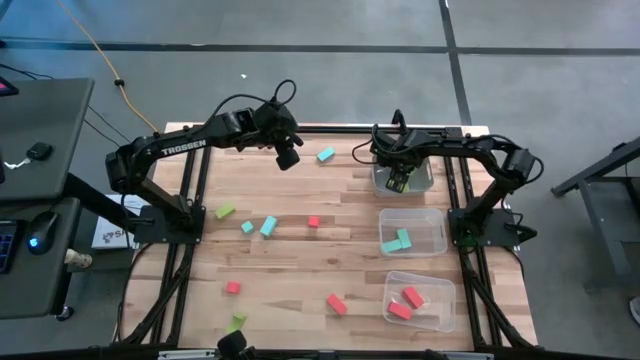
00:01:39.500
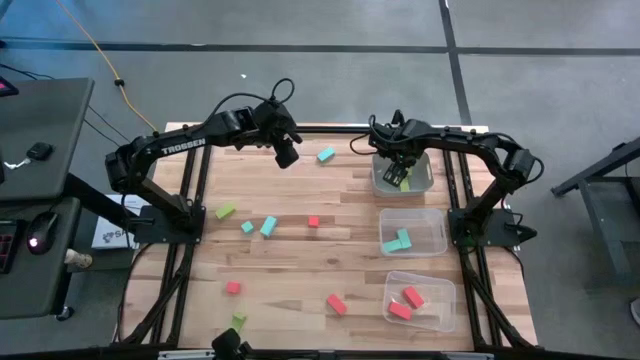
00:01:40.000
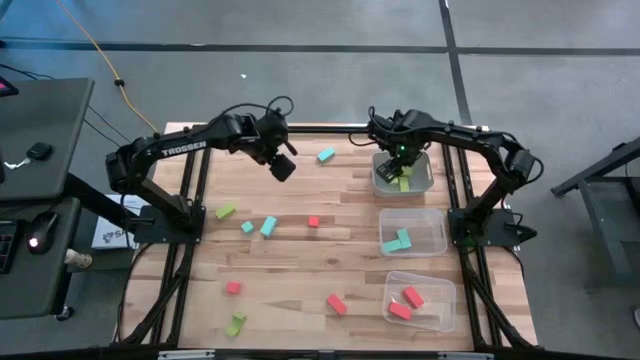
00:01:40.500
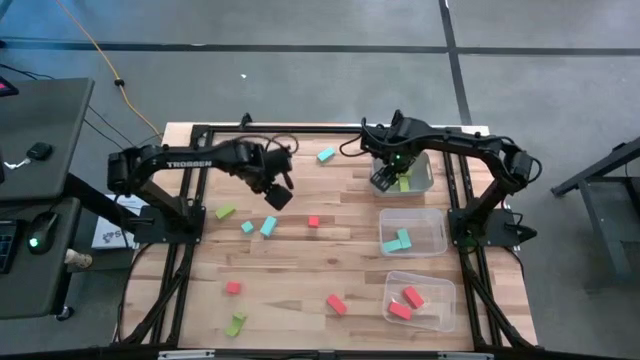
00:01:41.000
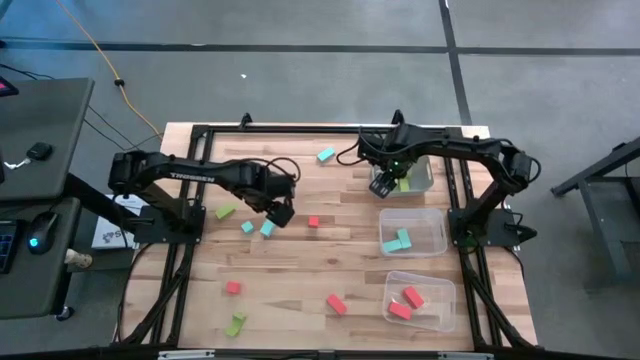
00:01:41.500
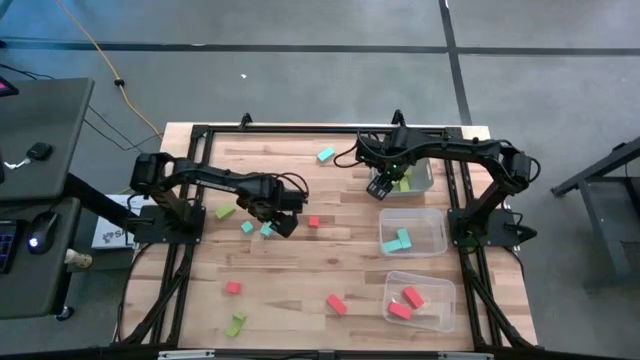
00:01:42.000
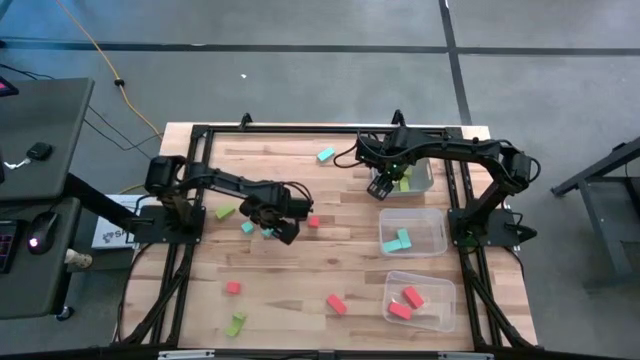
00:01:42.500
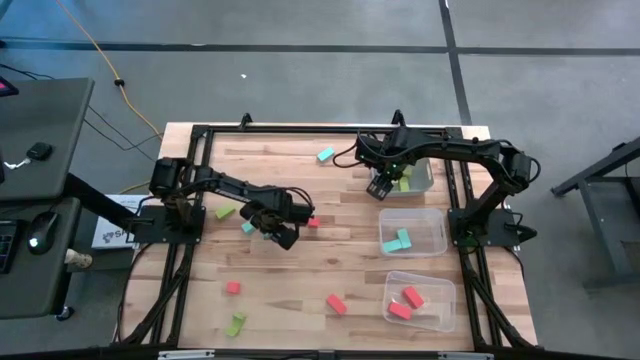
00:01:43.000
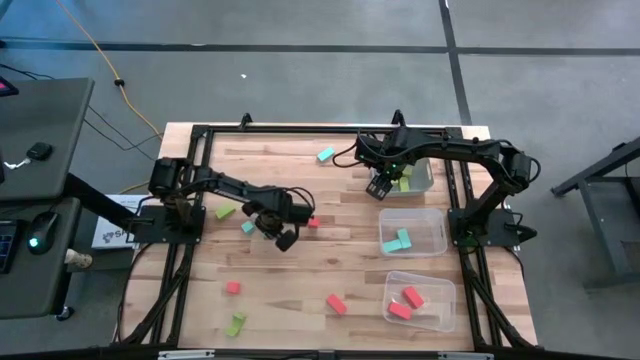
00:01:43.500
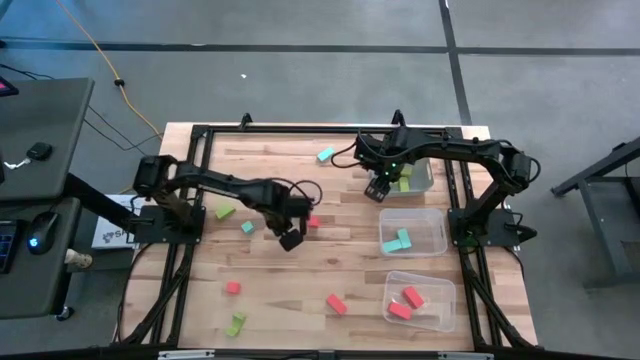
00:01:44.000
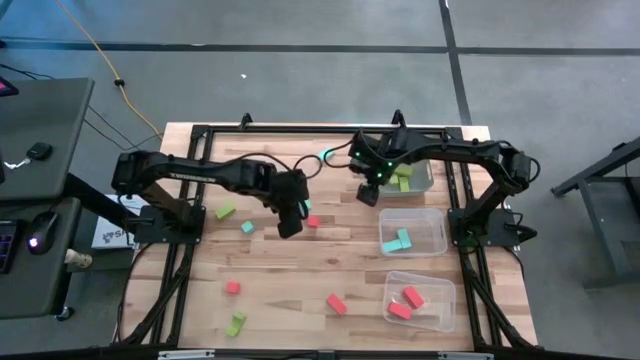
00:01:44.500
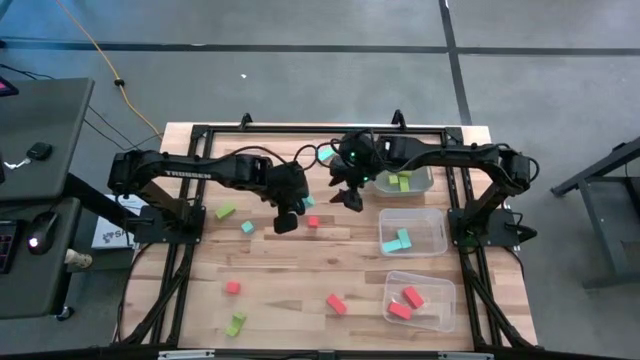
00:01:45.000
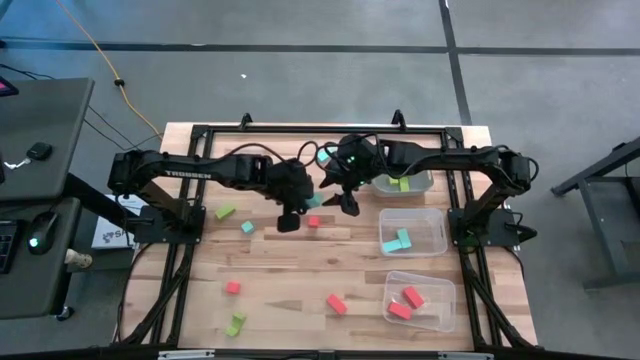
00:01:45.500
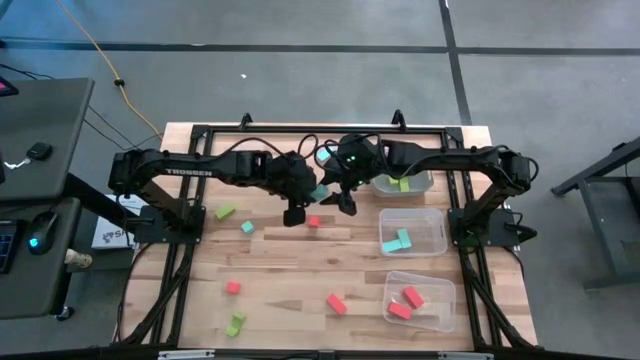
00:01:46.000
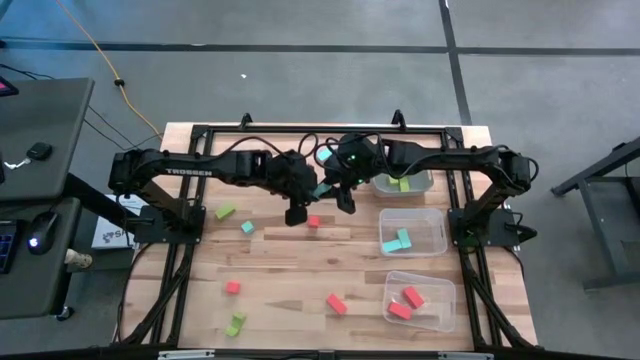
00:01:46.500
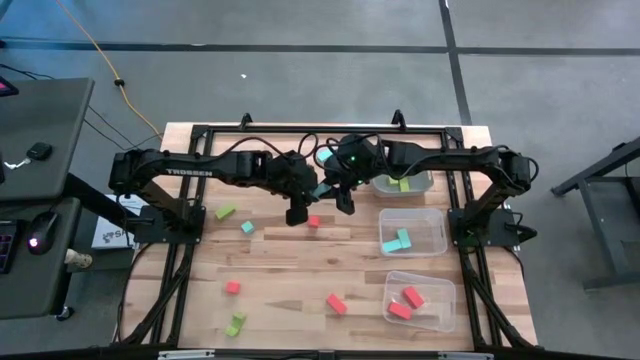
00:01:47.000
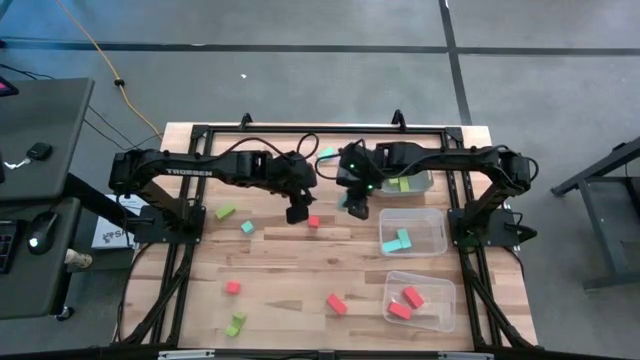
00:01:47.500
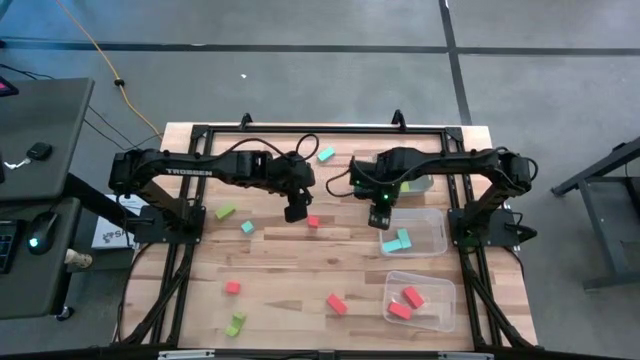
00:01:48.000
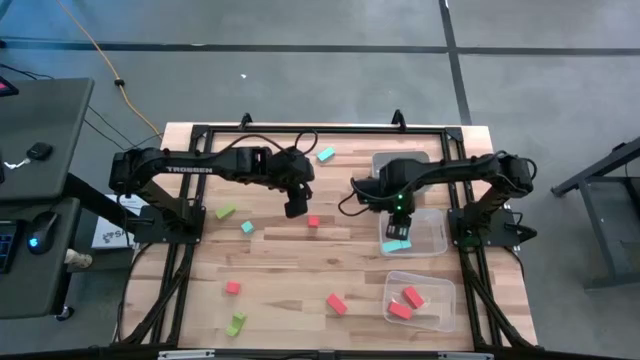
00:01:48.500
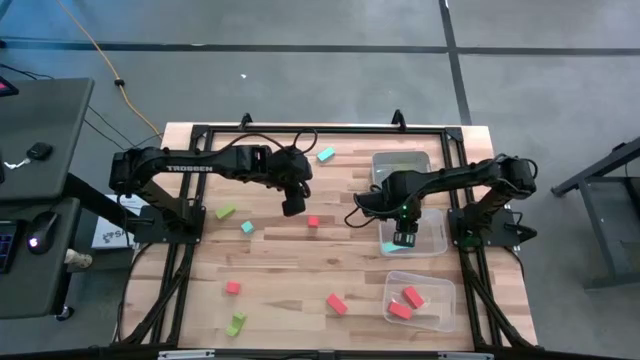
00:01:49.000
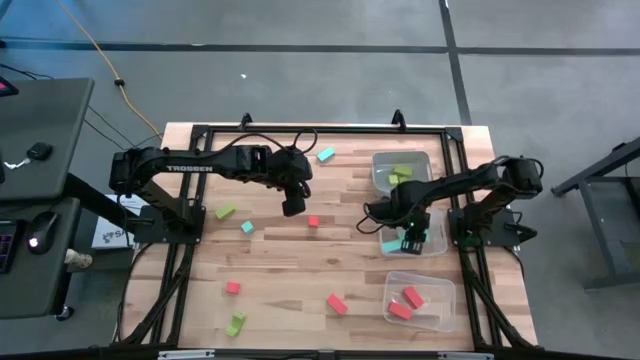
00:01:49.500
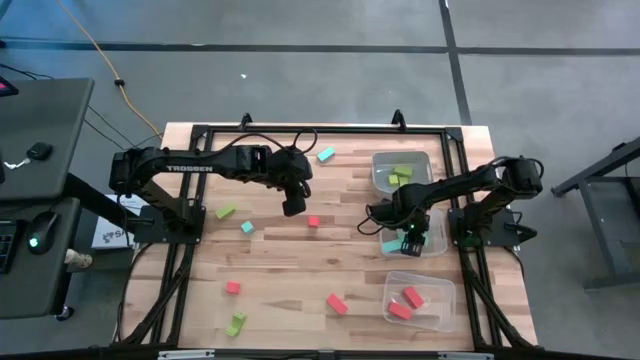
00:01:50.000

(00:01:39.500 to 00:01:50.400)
Task: Sort & place blocks by color
Put the light blue block into the top transparent bin

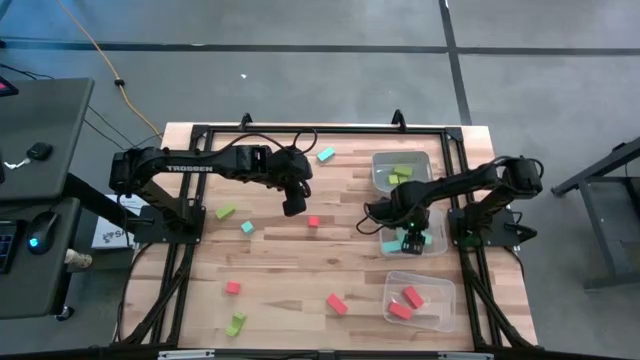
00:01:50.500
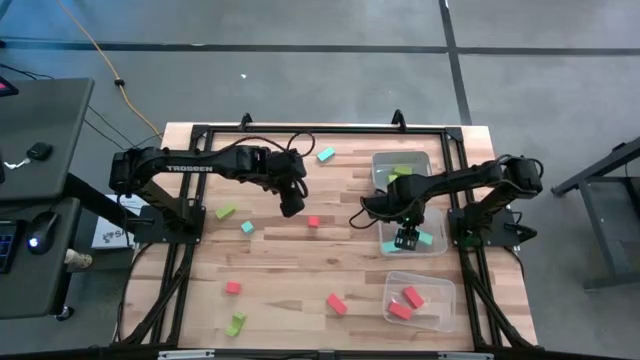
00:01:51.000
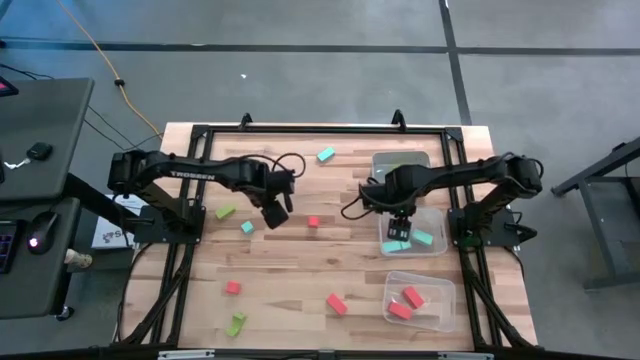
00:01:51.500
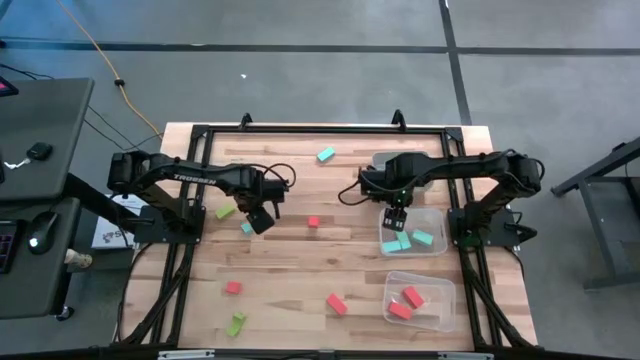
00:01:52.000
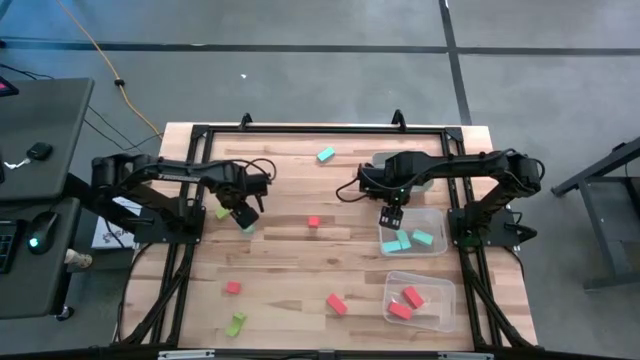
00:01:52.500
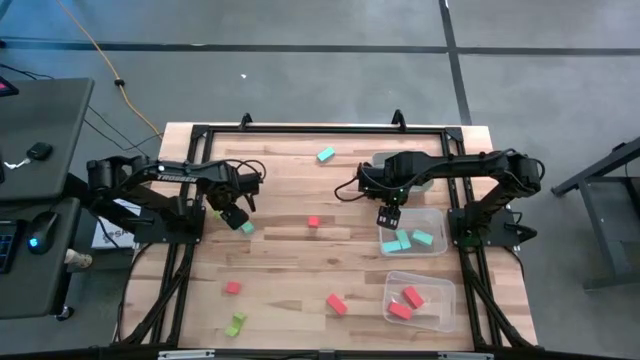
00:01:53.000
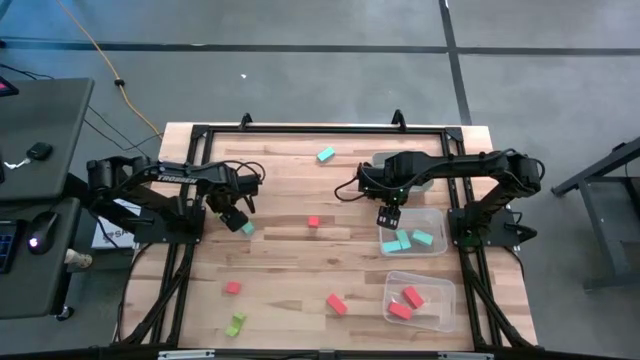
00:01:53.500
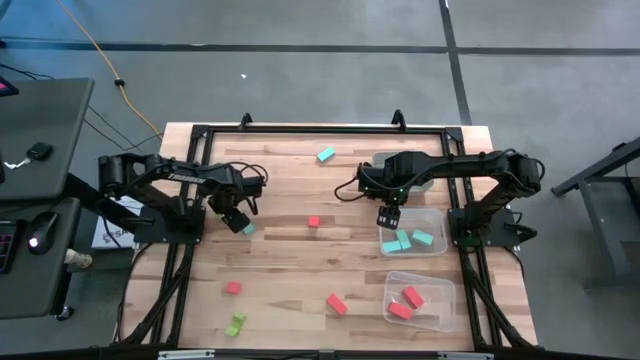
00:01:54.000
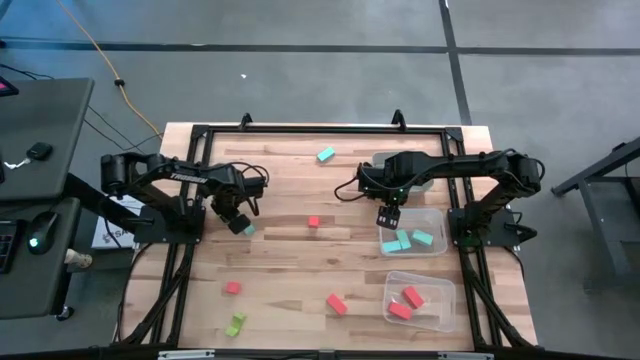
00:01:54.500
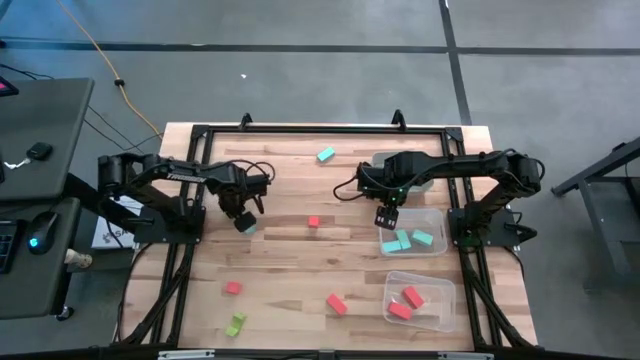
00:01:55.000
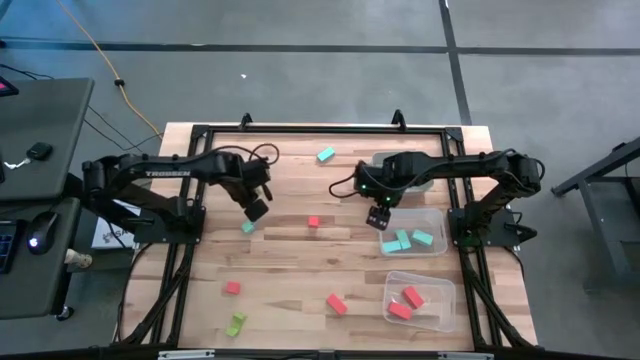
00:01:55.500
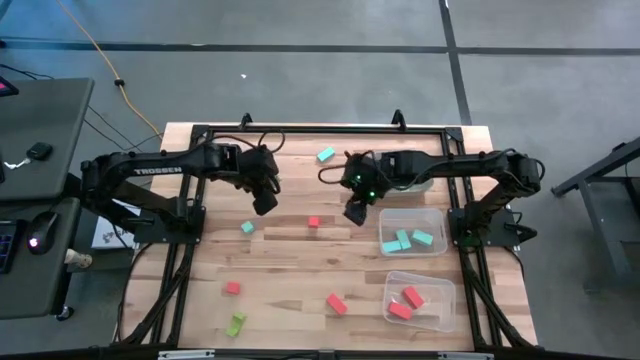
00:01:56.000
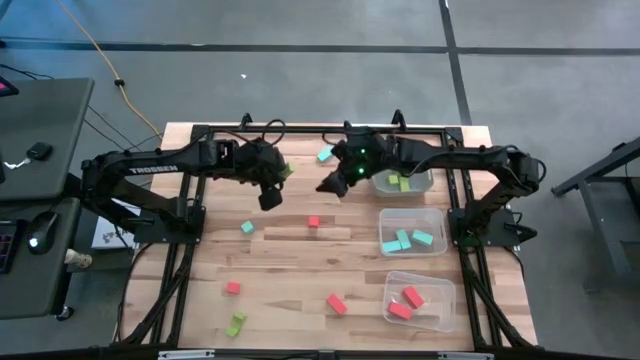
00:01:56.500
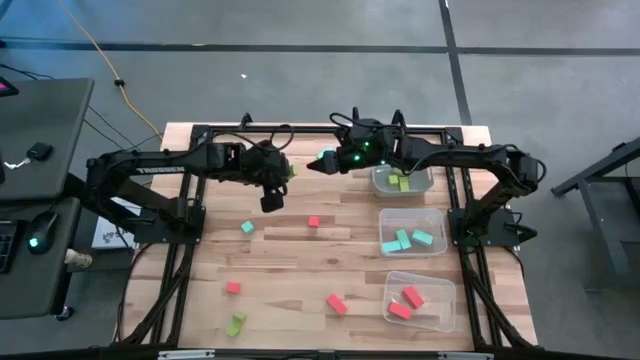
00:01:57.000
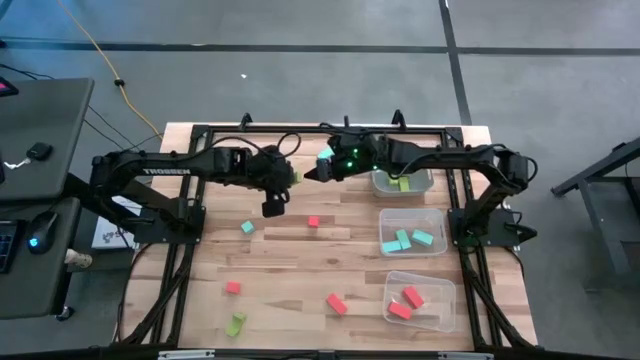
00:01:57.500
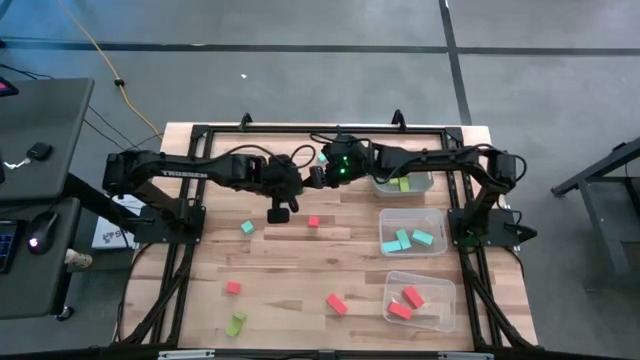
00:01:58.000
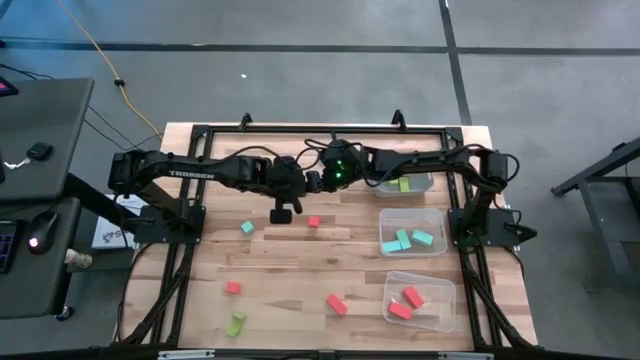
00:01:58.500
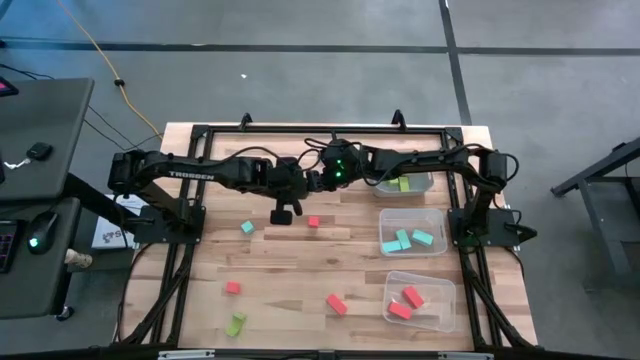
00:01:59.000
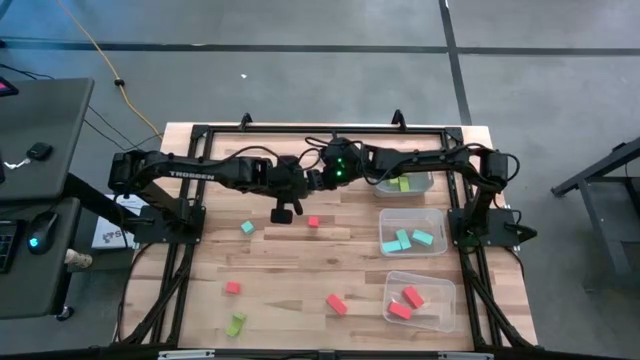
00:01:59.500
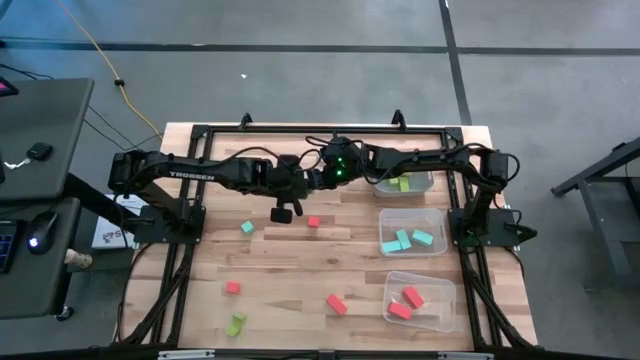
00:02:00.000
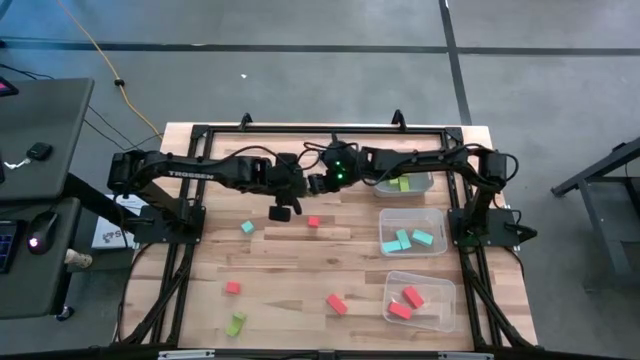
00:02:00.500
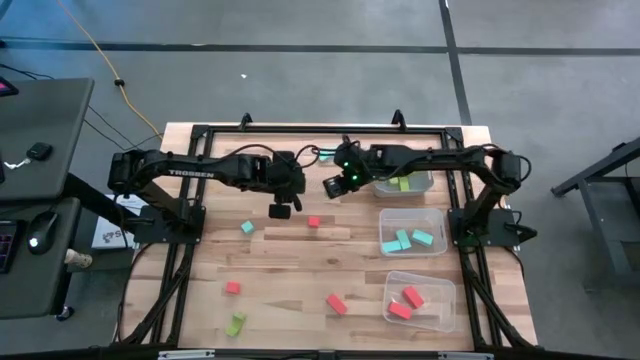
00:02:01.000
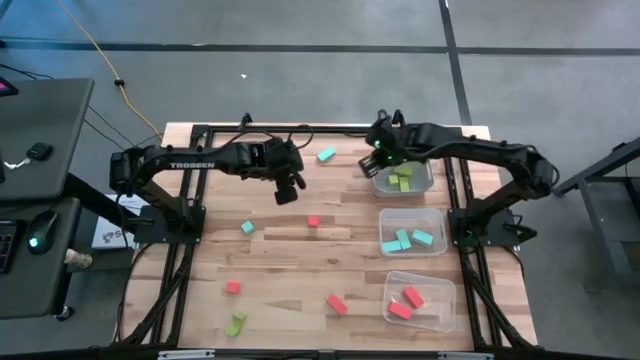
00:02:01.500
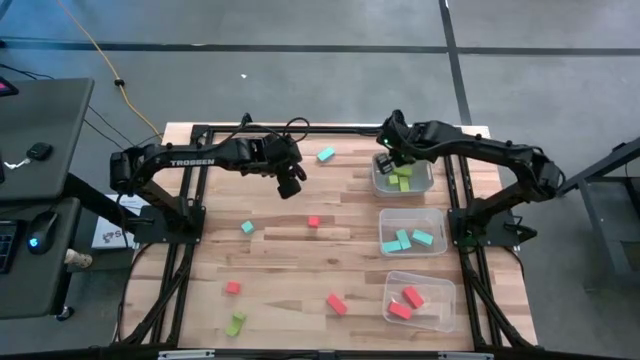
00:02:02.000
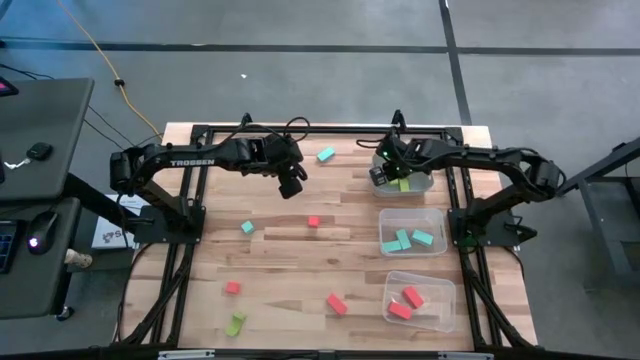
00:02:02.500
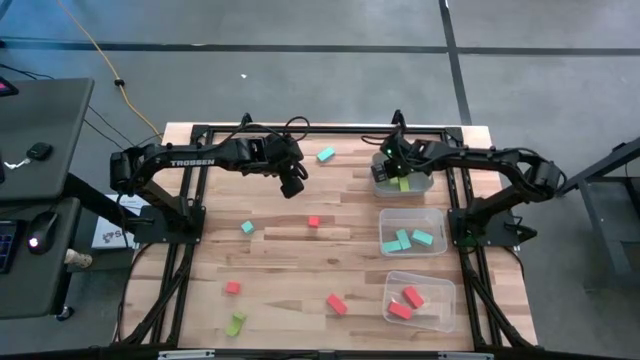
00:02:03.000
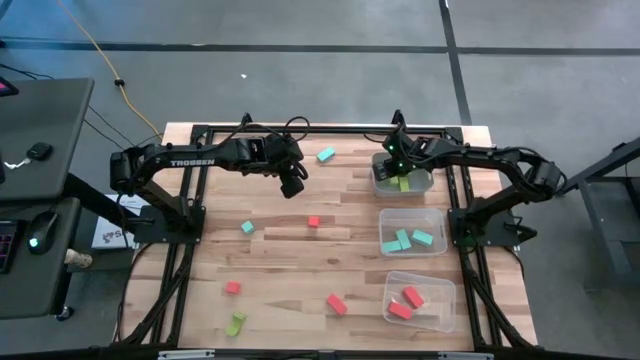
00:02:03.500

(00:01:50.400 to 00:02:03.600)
Put the light green block into the gray bin
